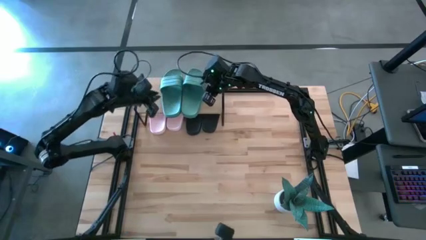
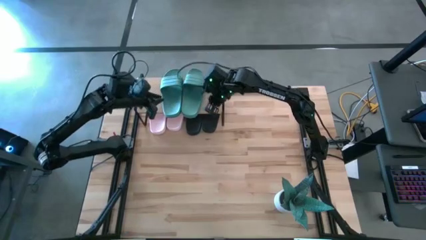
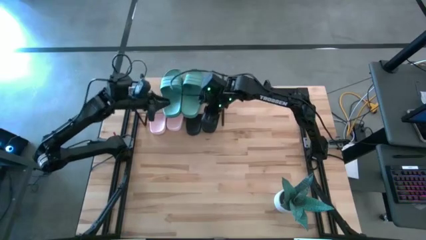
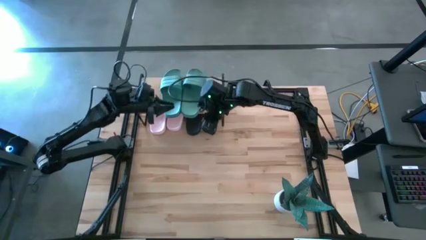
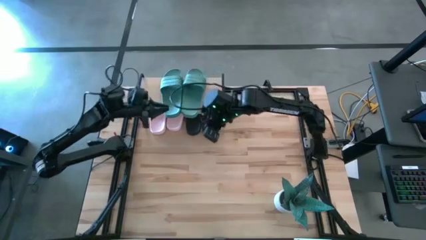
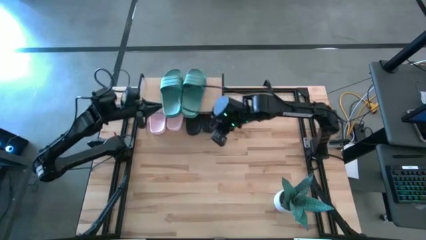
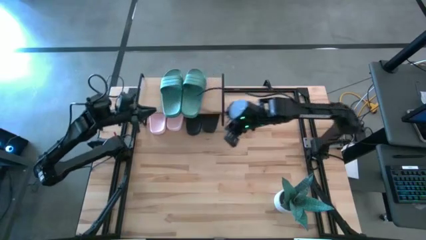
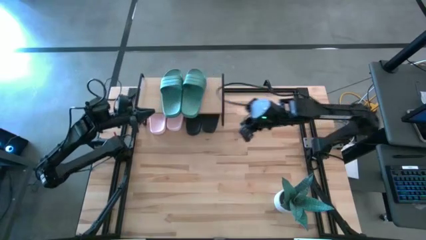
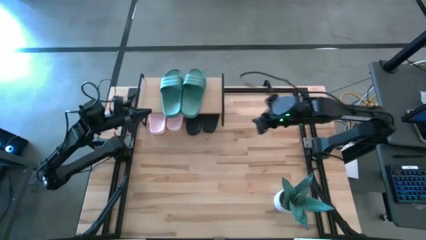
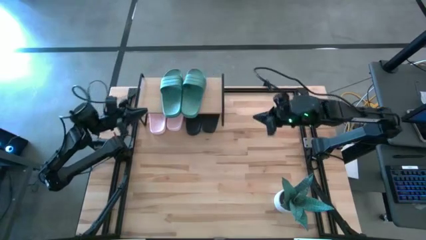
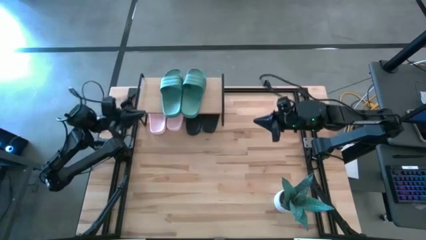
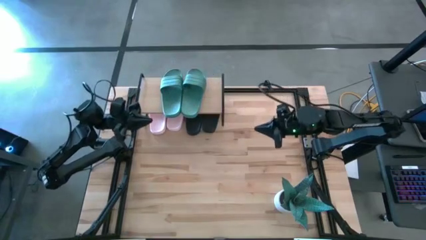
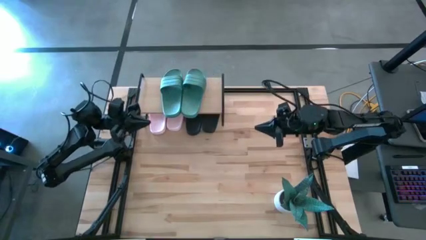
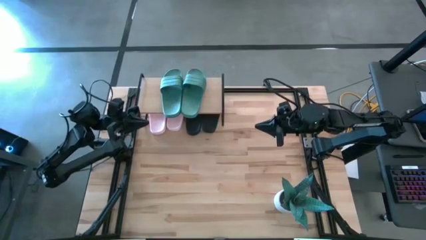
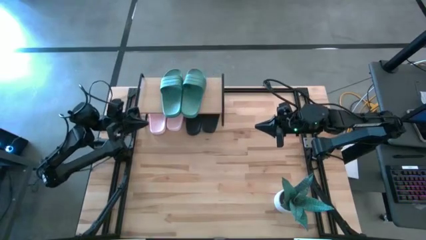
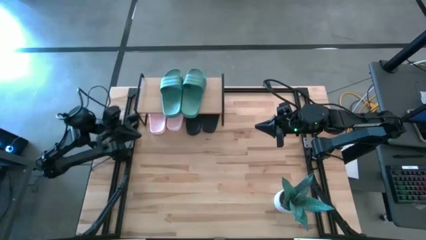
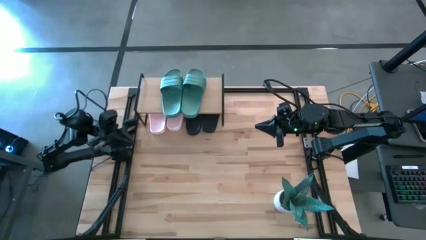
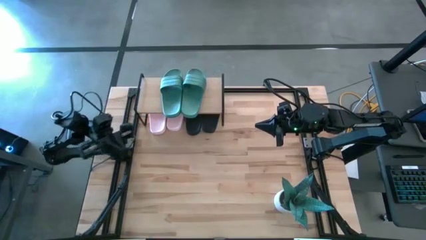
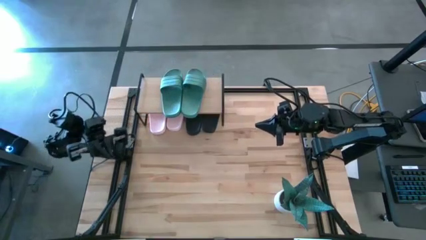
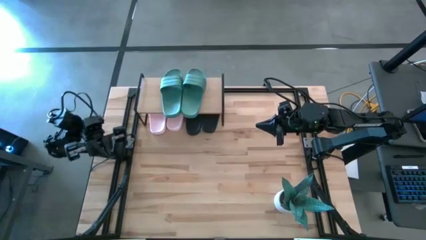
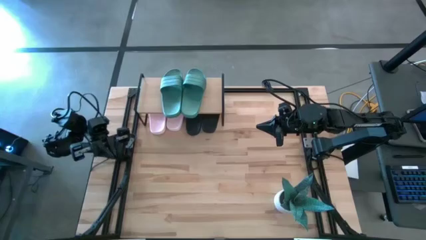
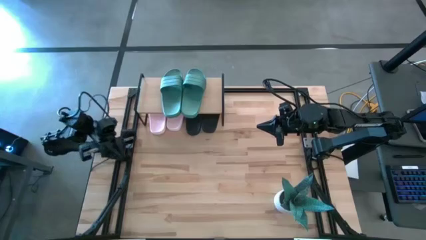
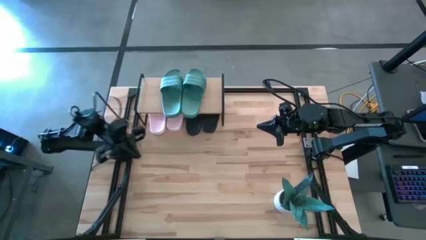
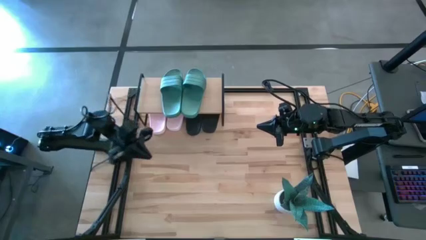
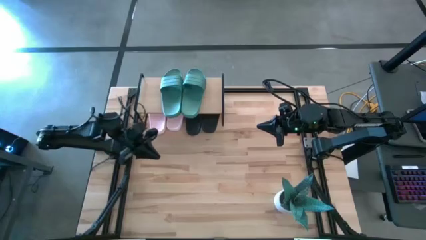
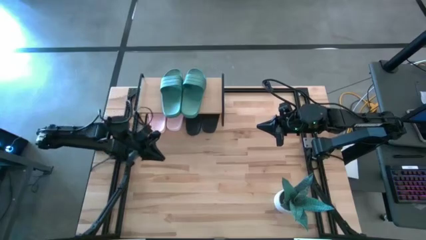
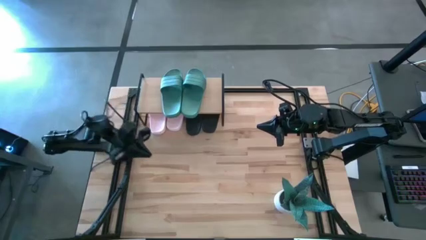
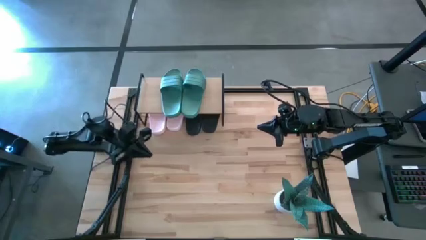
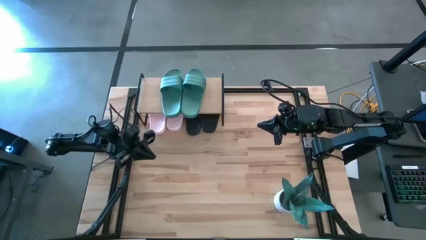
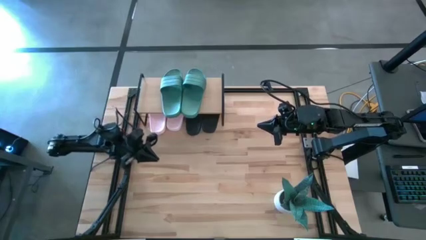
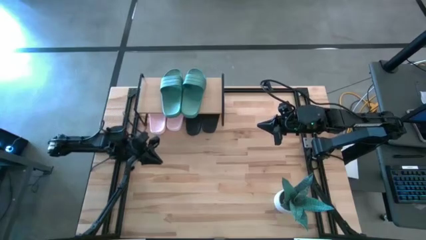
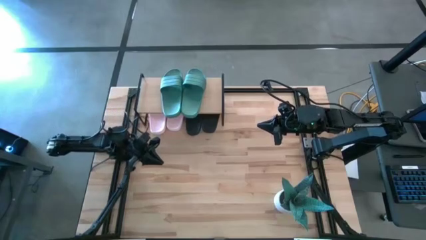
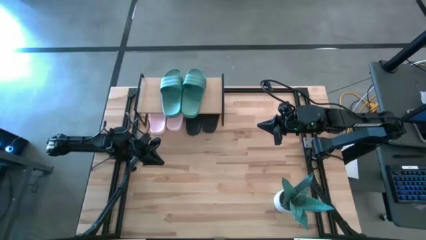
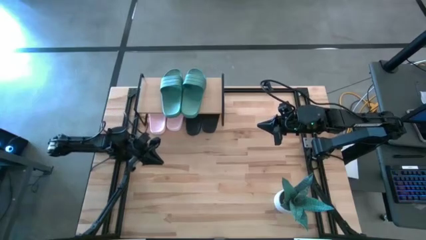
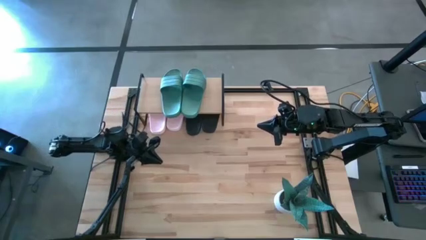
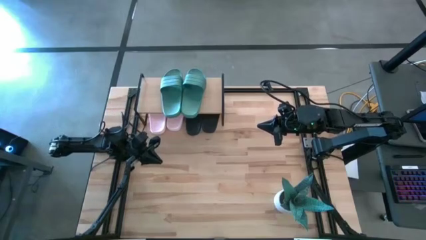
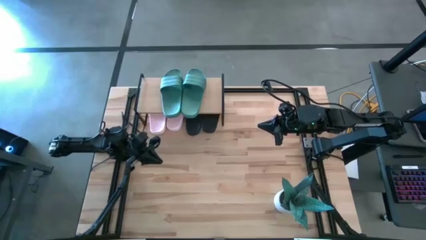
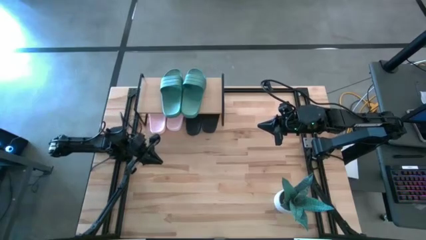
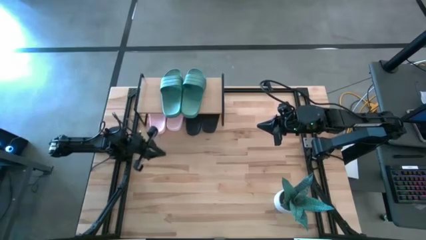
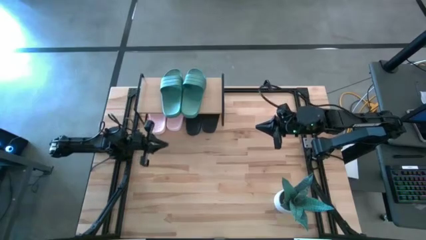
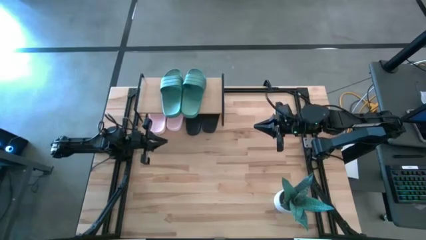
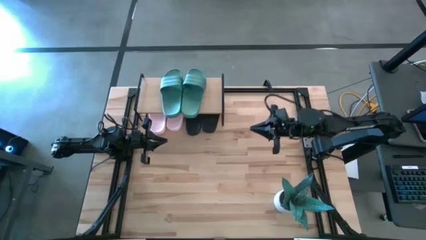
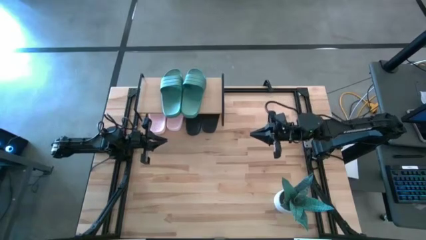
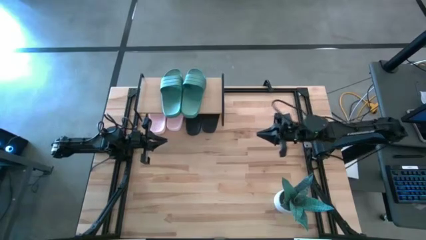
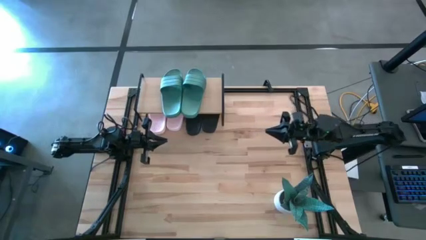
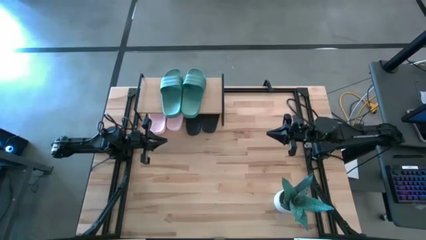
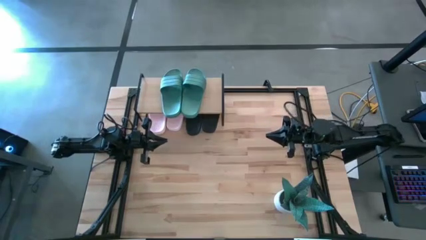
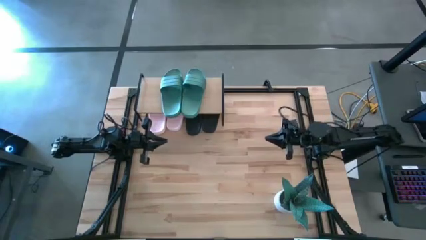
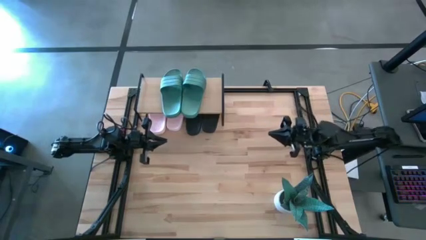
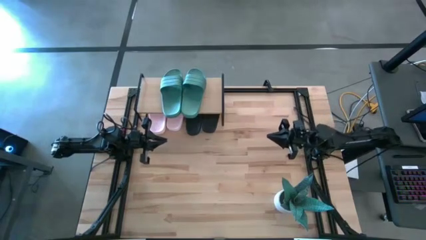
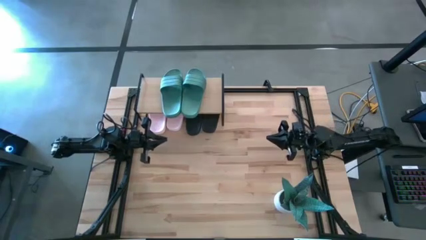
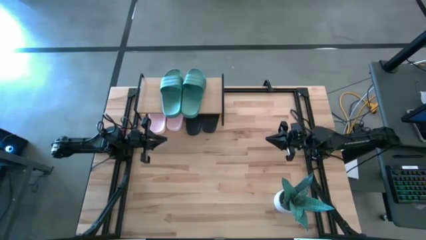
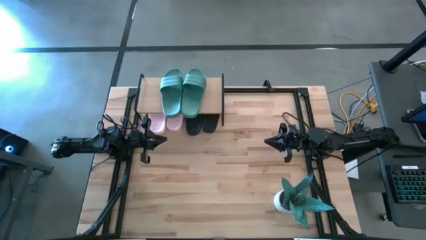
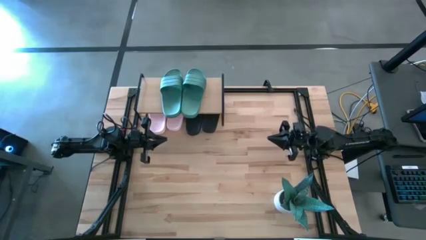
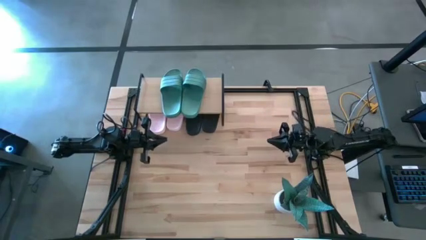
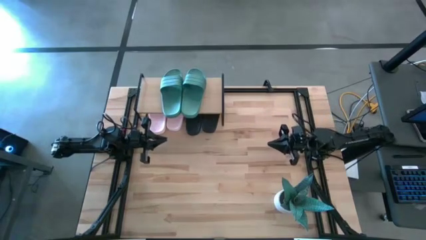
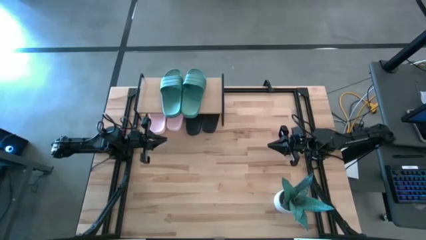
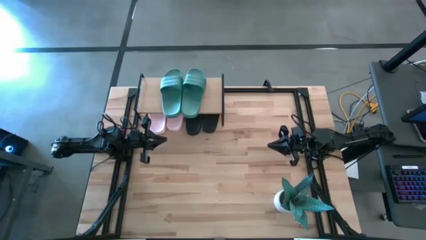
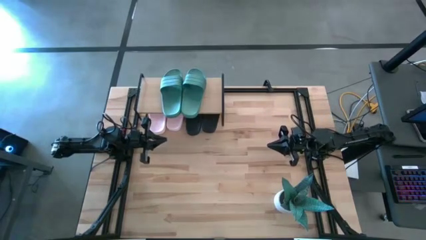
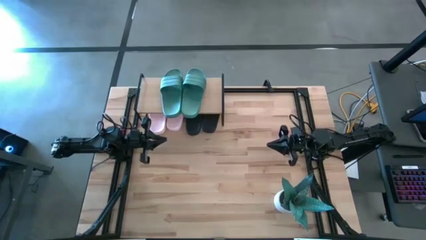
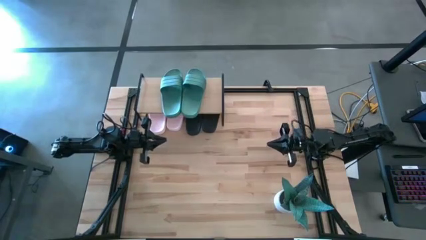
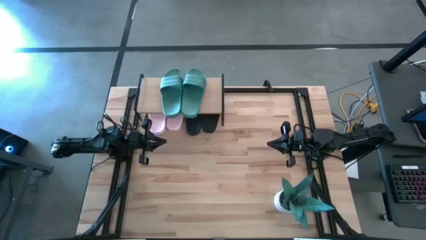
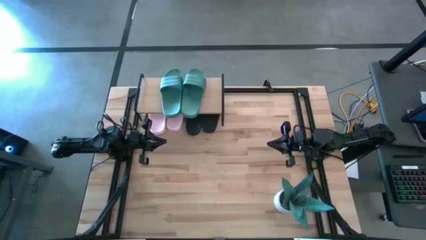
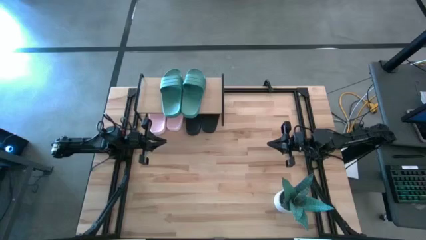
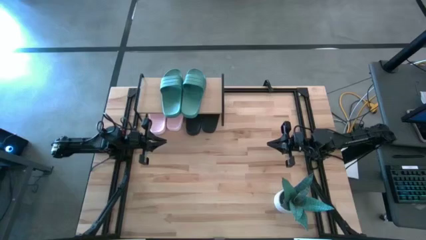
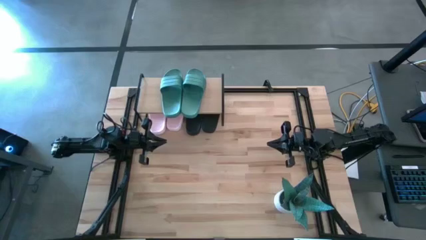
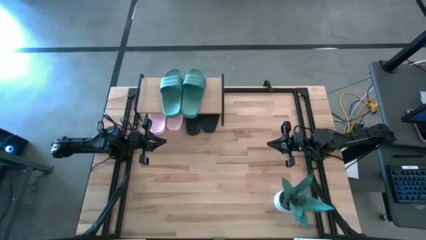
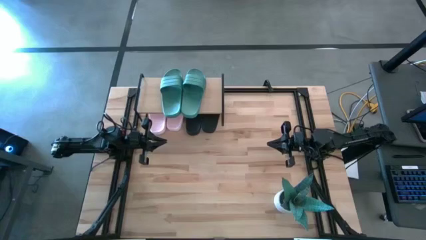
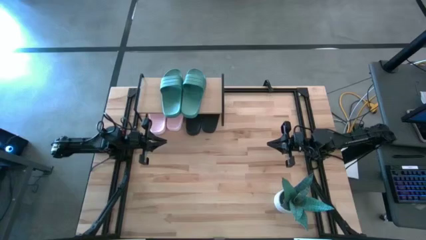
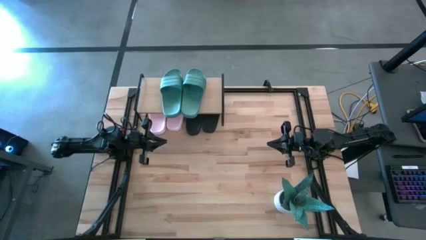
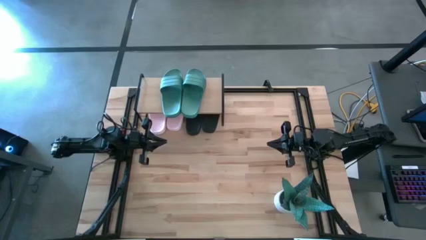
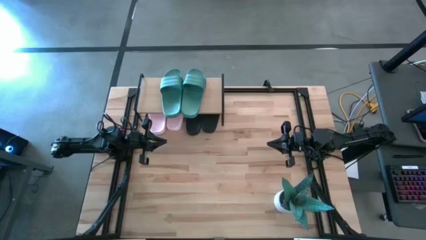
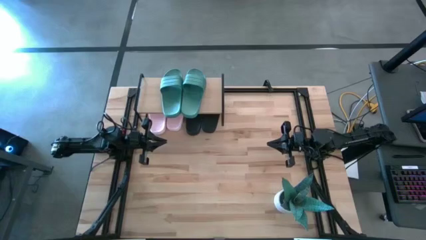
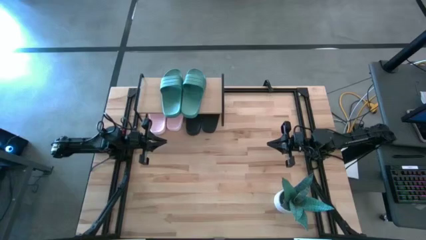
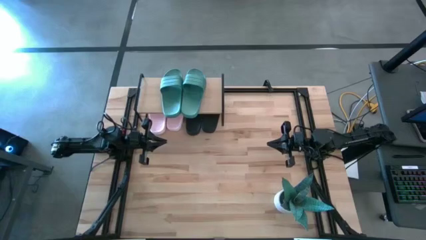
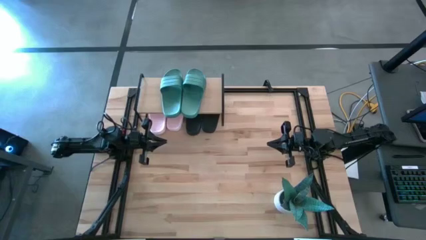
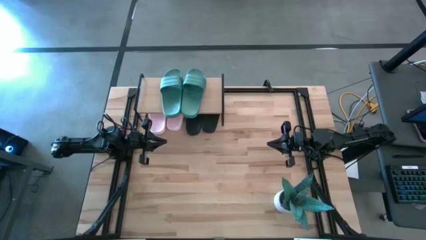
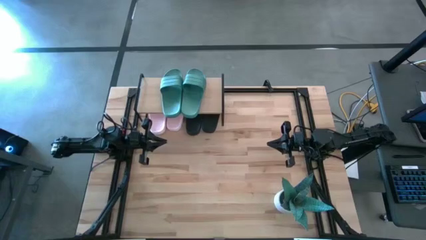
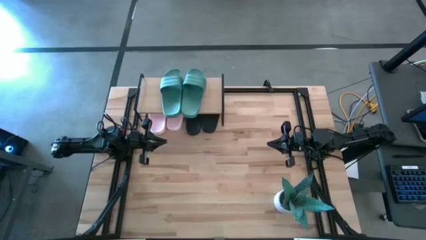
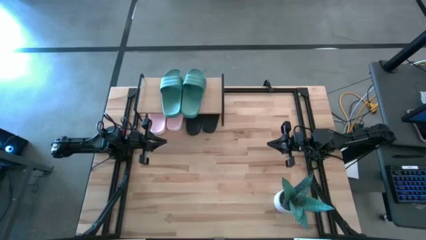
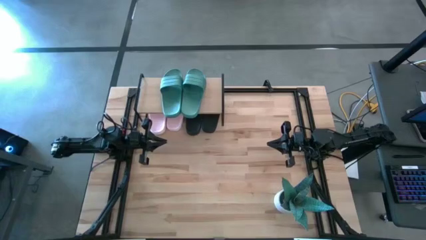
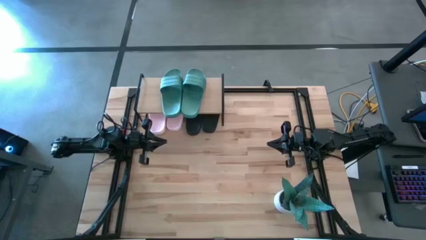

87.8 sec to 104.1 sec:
Task: Pick and place slides into the shelf
Return to Home Position
